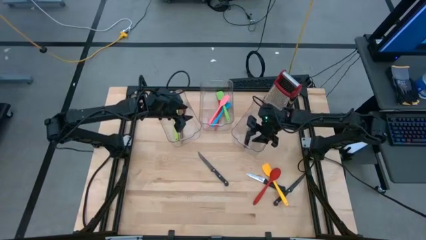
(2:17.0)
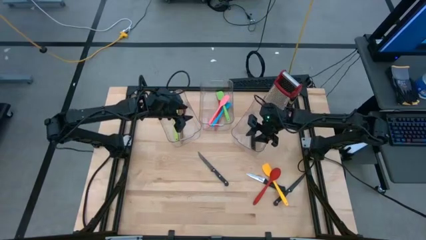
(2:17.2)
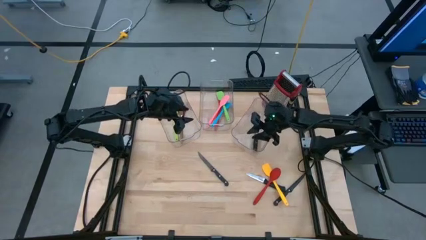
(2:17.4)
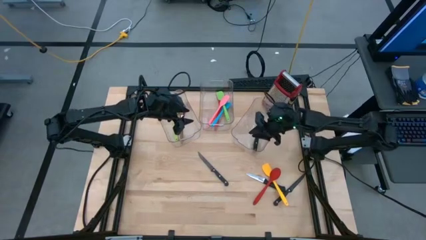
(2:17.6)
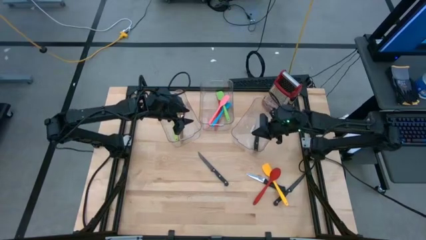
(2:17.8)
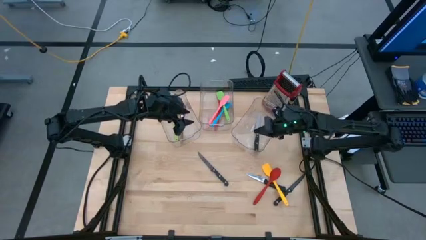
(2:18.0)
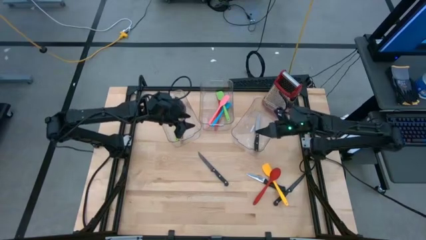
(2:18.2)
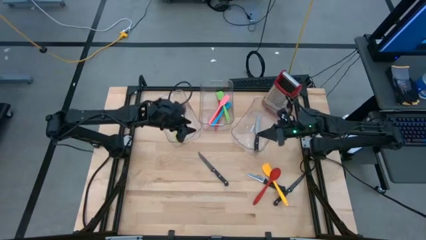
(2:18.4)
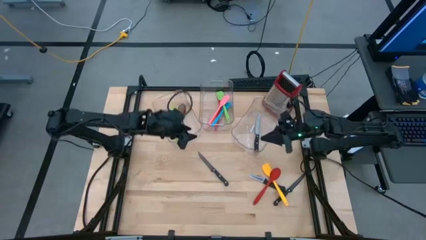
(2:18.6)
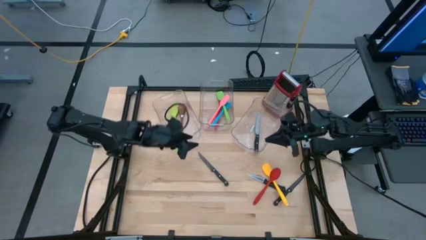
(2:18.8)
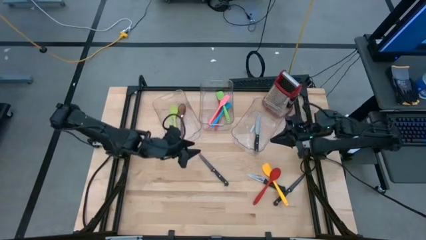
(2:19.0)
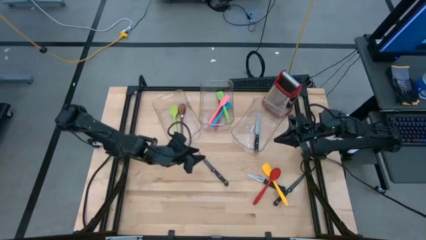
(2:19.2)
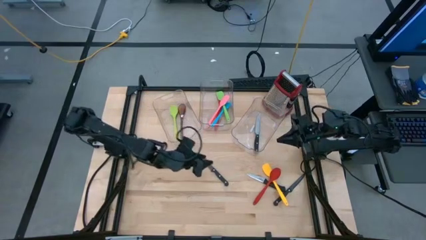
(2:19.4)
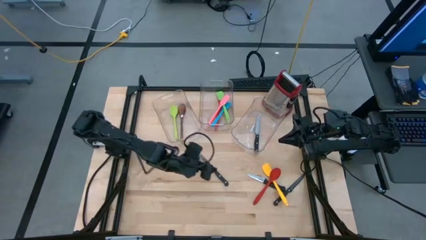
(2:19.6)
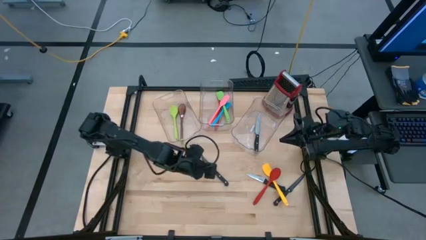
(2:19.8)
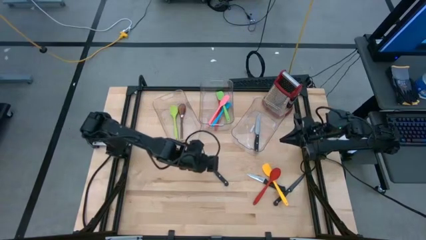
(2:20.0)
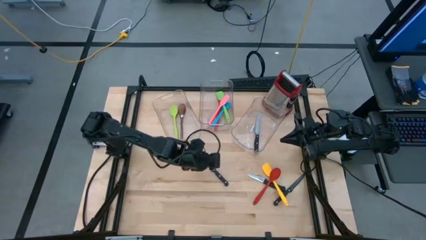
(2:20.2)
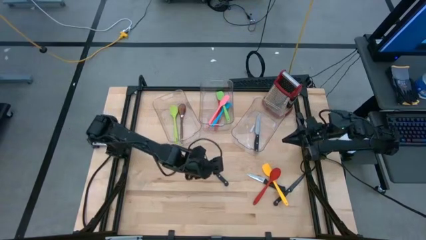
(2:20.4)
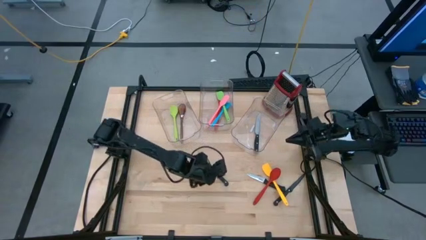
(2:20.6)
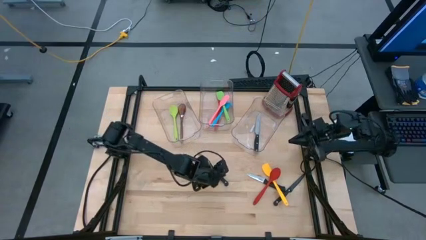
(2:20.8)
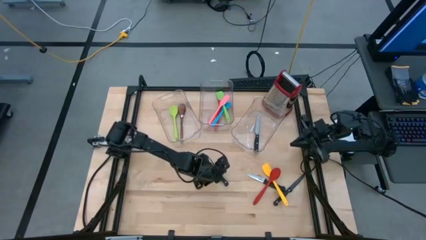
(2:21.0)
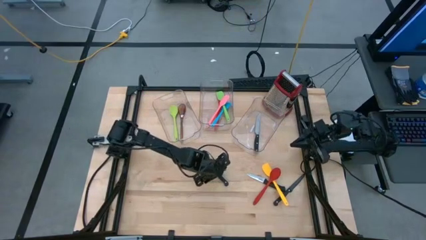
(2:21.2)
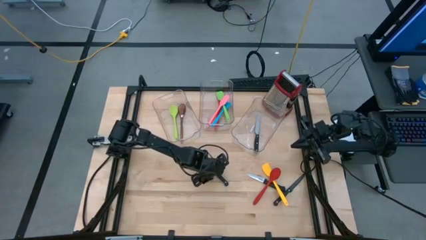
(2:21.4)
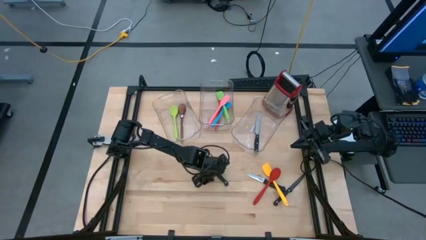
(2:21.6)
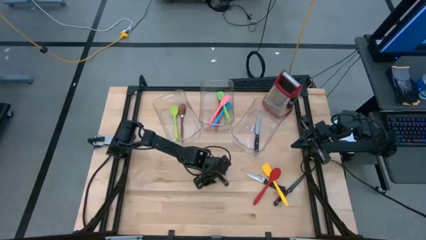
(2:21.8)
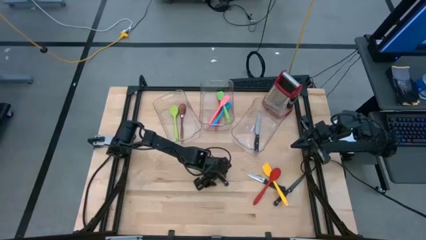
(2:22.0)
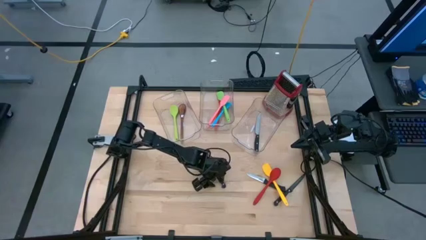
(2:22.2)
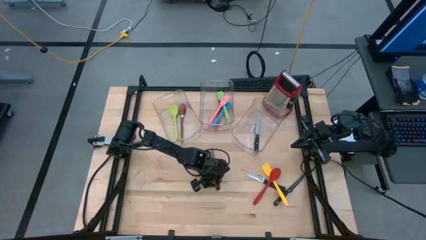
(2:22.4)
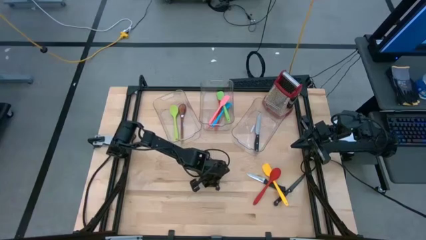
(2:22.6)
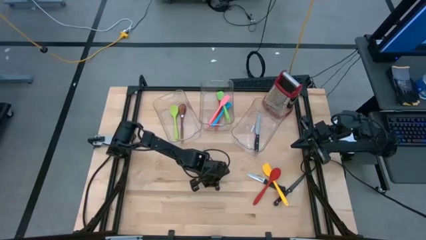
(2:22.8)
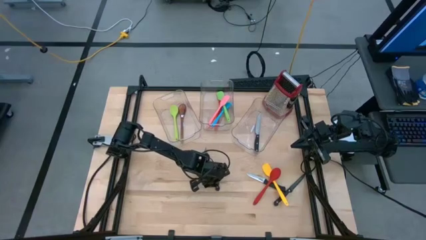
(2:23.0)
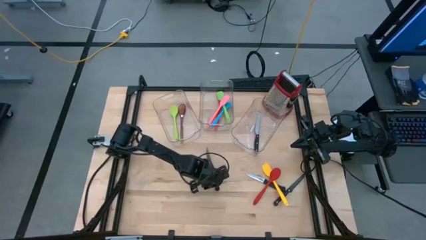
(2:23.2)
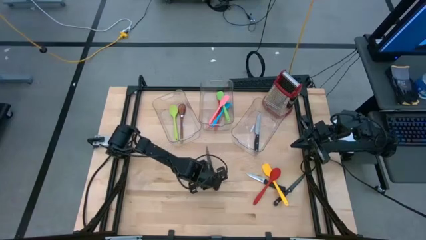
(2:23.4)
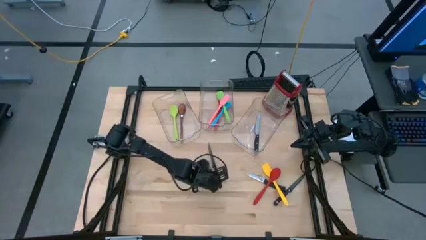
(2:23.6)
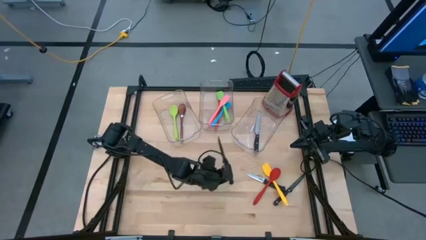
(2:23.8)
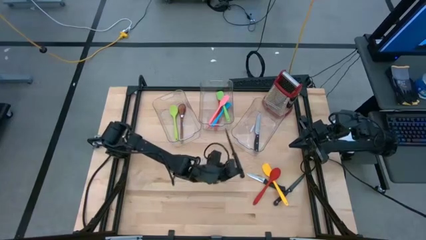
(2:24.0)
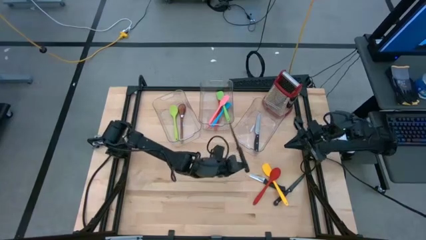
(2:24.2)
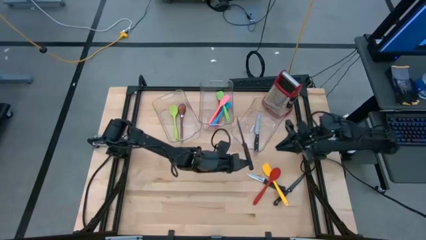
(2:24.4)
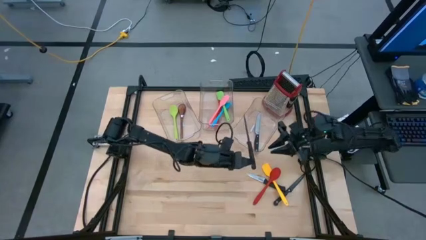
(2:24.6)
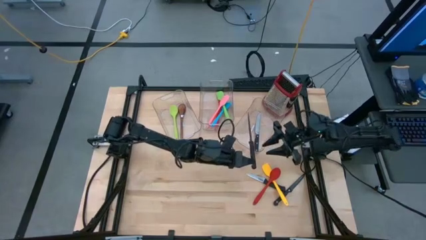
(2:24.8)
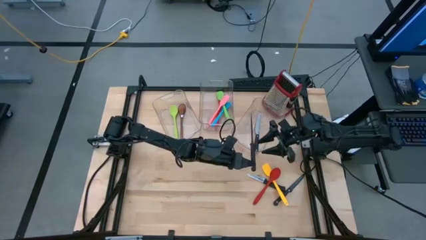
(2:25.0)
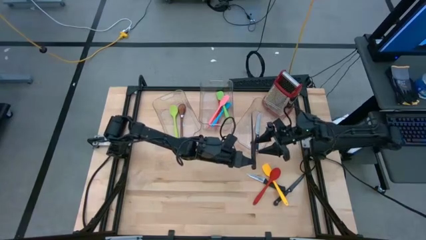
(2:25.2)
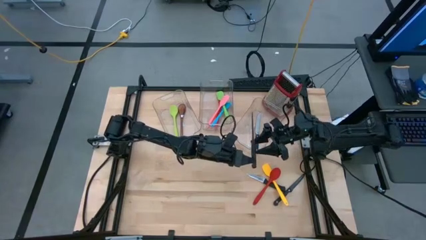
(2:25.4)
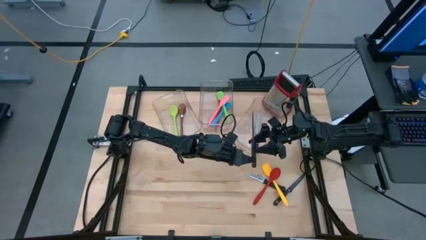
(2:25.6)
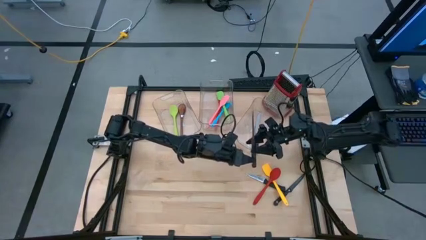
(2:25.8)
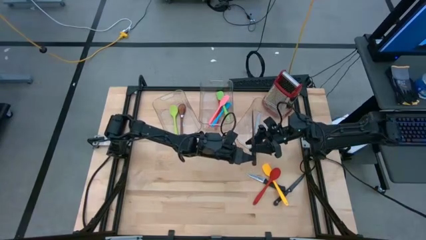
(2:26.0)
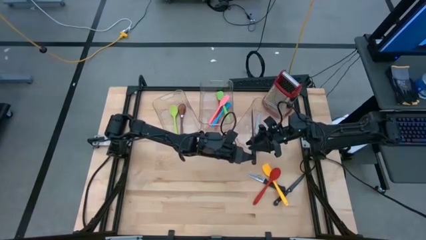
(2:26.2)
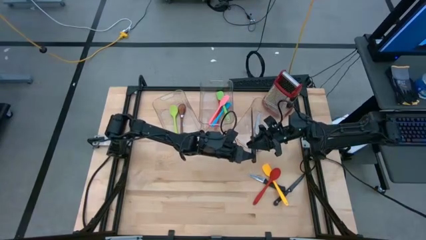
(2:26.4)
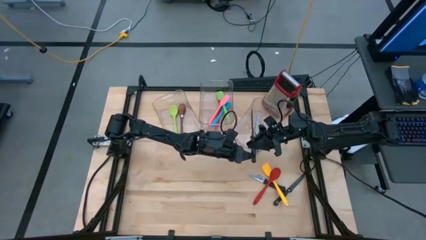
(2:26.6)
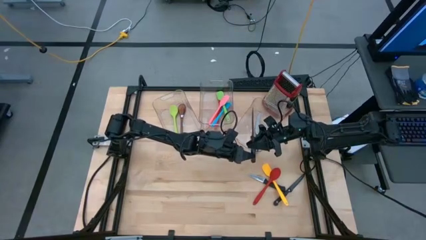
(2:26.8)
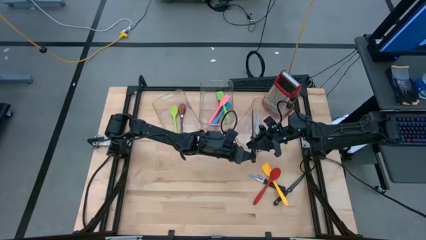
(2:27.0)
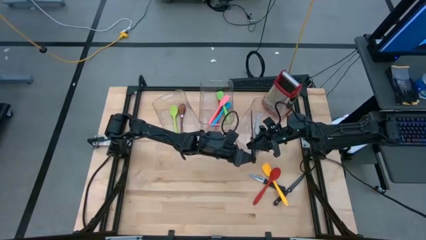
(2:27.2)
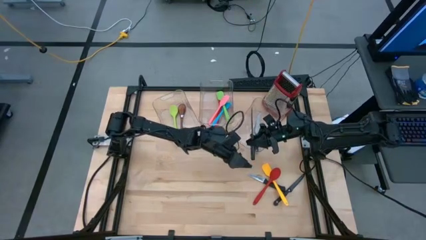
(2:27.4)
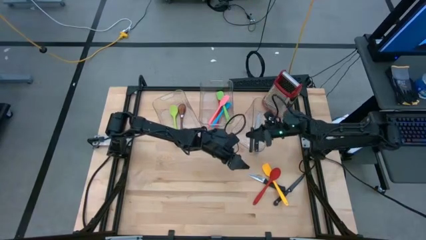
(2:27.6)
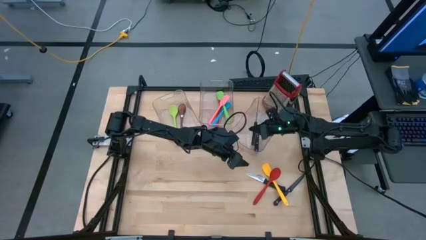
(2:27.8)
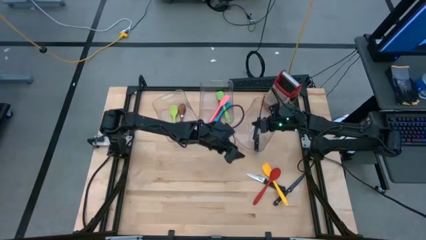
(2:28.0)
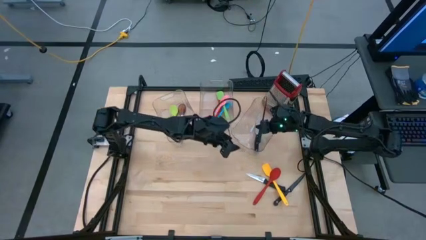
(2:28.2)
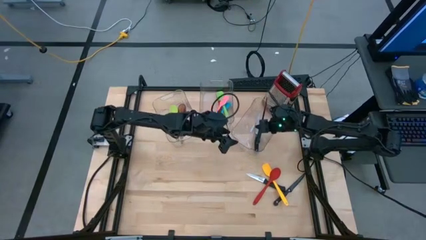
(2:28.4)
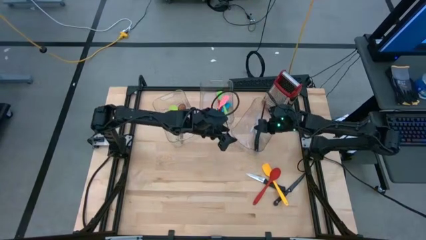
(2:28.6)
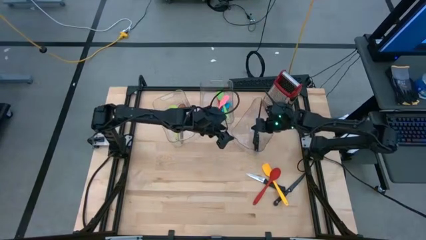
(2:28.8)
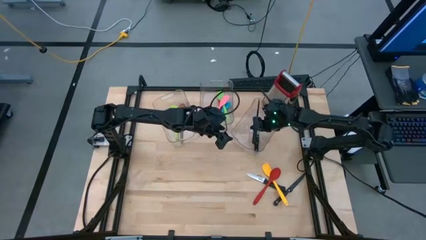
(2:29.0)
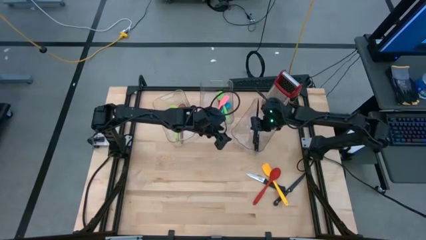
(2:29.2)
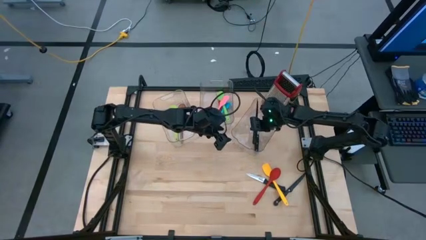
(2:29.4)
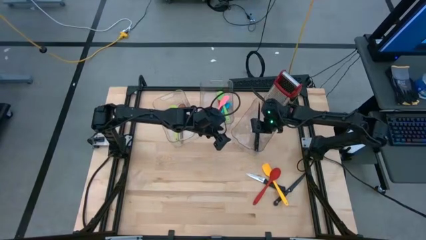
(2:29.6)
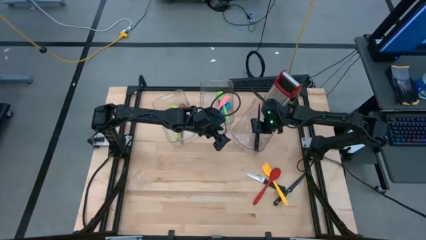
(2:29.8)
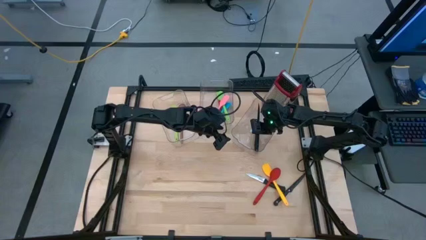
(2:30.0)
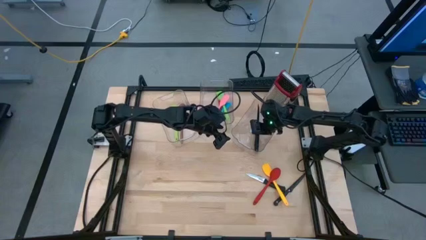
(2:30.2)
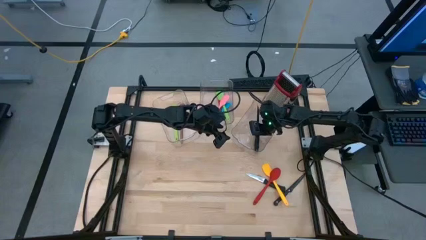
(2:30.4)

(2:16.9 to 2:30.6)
Task: Pick & Place Kitchen Items
Put the left black kitchen knife in the right bin

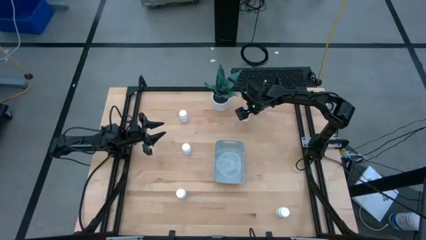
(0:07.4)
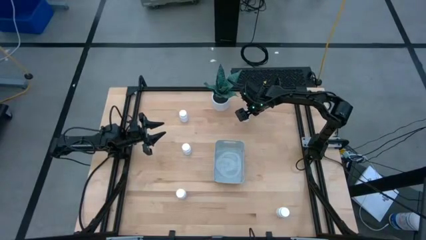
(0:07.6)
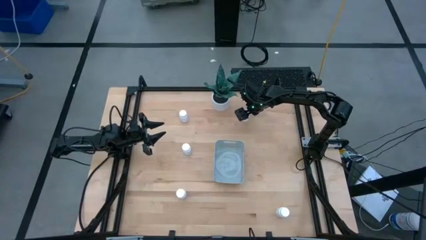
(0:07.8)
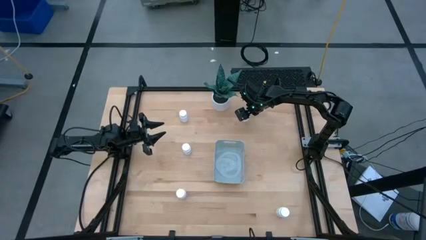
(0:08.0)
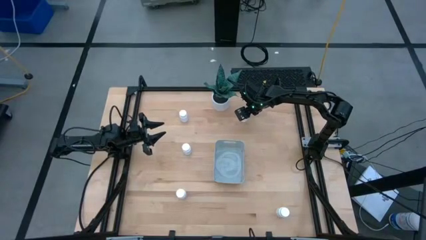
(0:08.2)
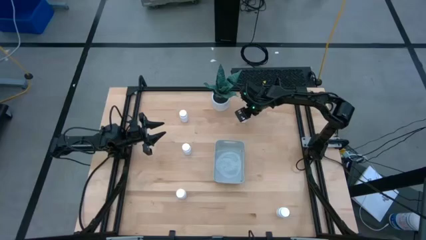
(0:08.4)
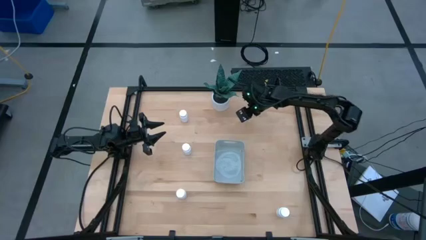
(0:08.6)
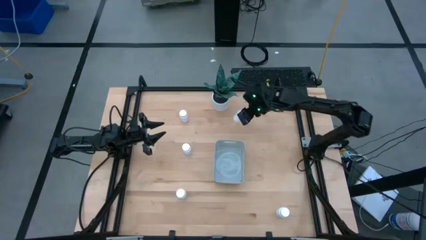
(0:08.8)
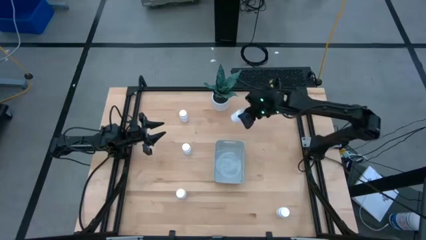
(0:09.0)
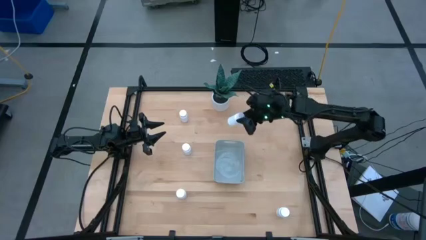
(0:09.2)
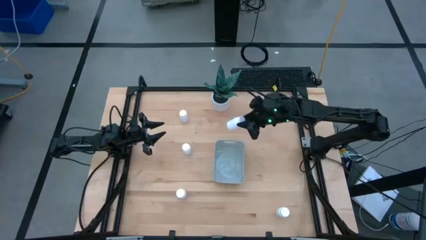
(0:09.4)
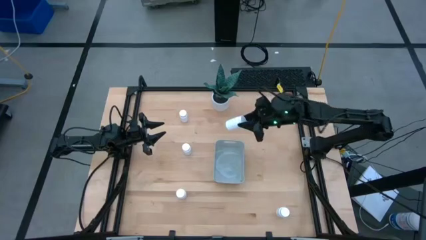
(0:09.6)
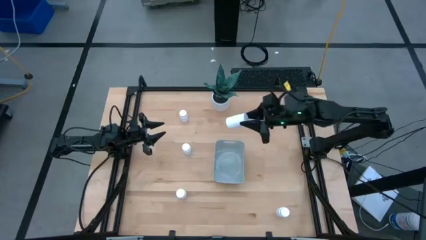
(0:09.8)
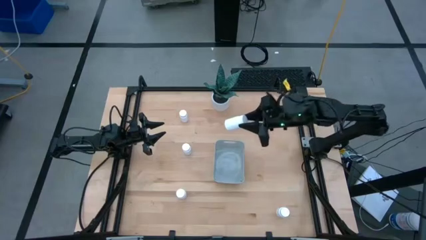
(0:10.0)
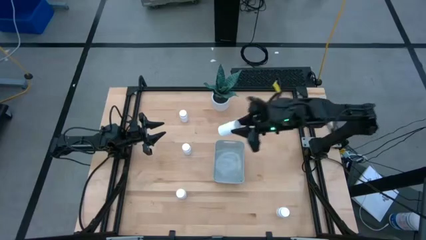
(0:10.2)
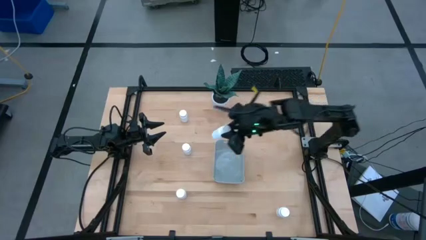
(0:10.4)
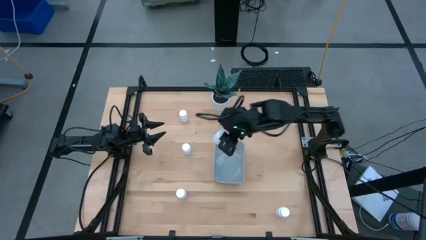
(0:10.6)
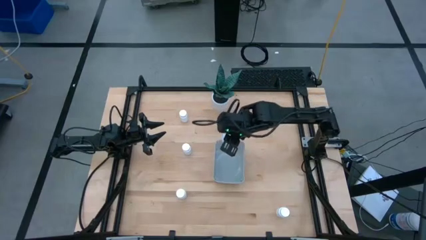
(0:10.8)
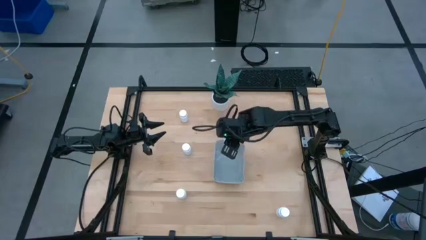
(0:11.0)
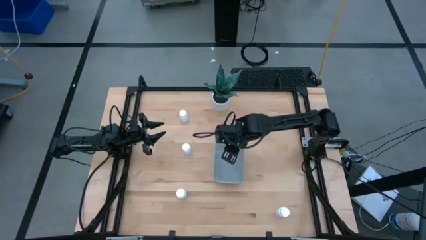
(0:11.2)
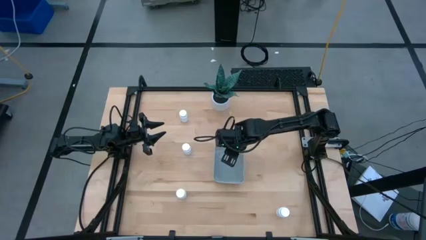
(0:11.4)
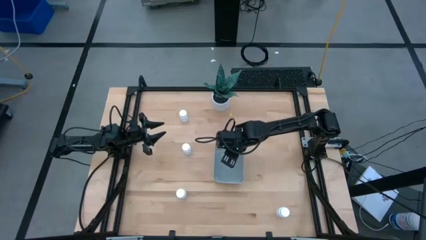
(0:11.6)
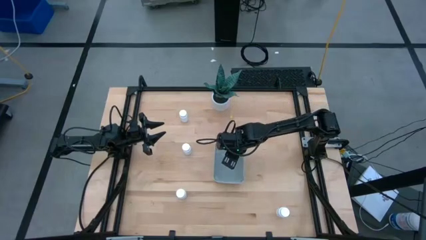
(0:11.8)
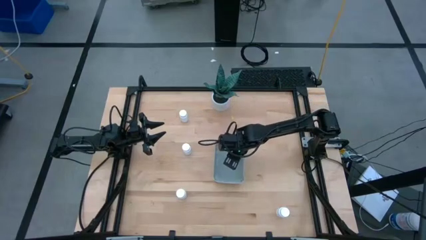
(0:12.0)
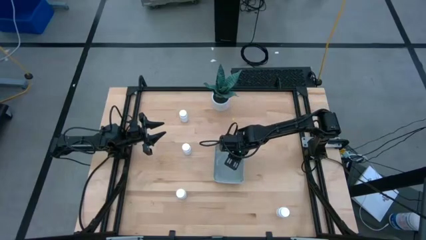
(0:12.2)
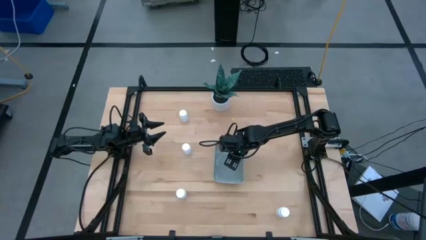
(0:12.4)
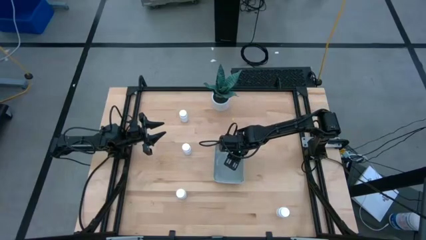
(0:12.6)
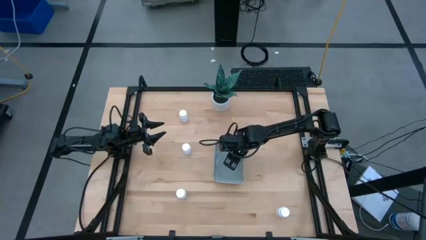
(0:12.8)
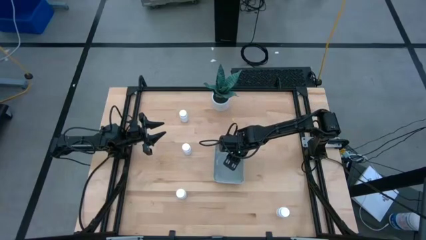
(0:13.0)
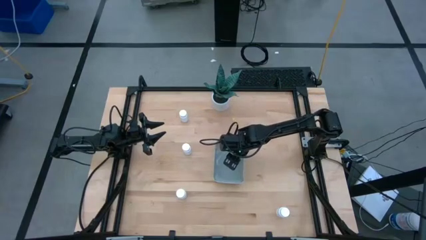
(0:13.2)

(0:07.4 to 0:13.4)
Task: Pick and place pill bottles into a basket
Put the white pill bottle into the gray bin
